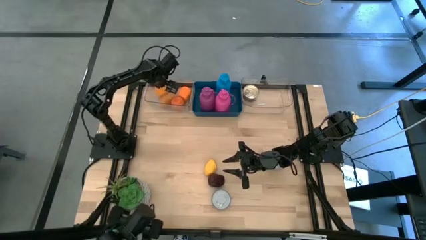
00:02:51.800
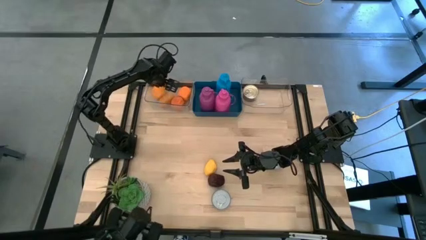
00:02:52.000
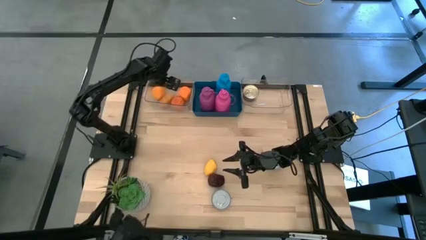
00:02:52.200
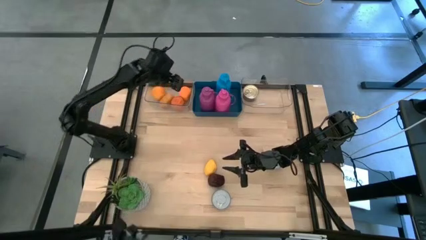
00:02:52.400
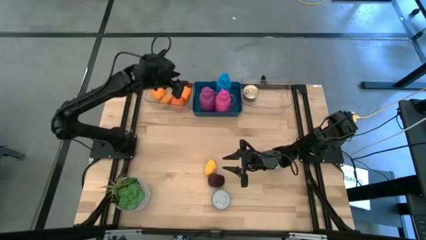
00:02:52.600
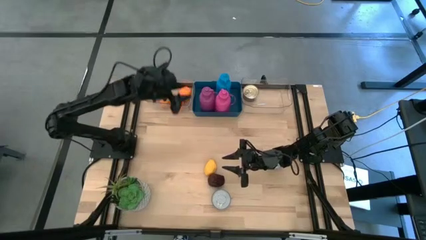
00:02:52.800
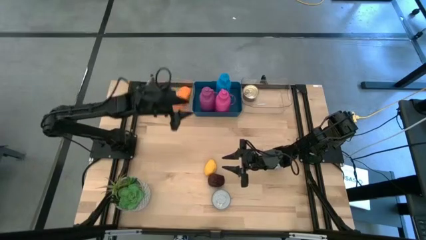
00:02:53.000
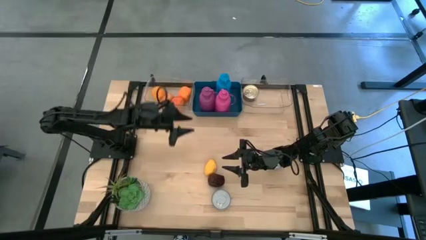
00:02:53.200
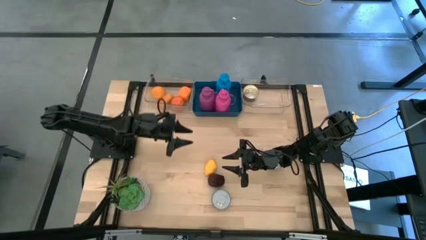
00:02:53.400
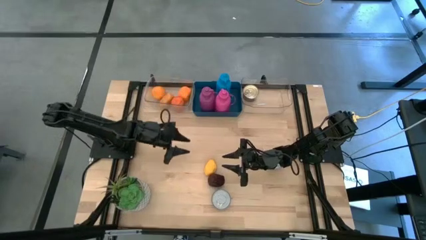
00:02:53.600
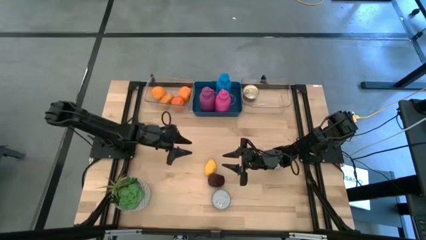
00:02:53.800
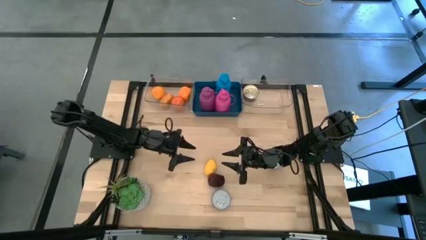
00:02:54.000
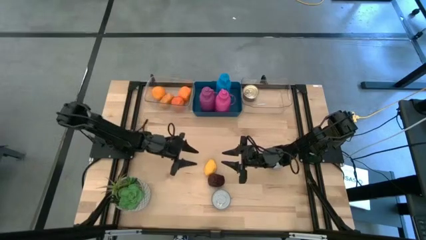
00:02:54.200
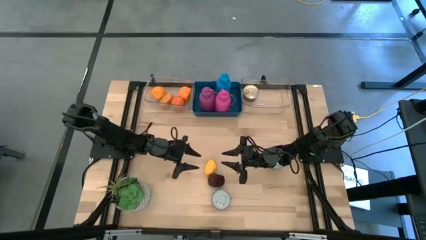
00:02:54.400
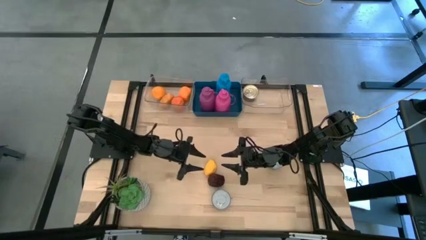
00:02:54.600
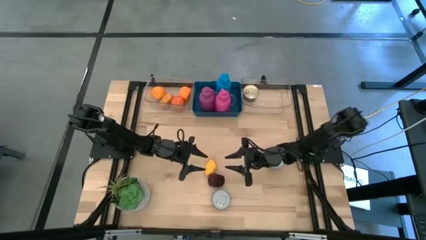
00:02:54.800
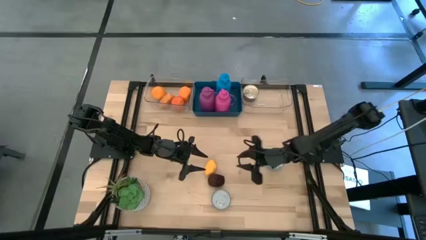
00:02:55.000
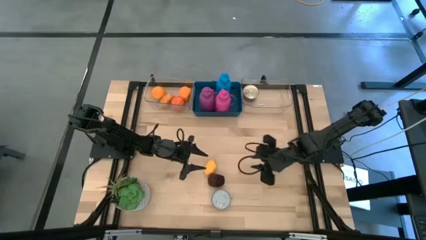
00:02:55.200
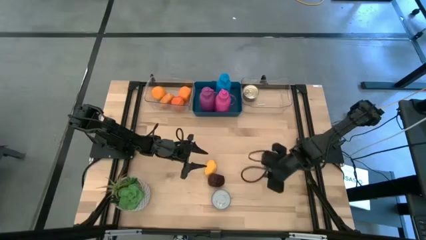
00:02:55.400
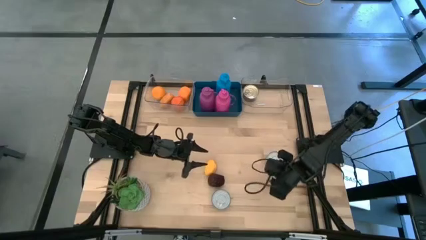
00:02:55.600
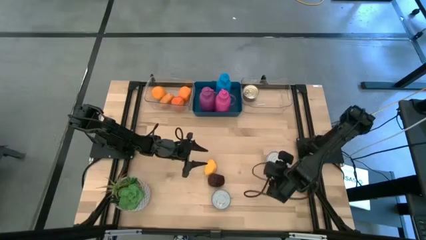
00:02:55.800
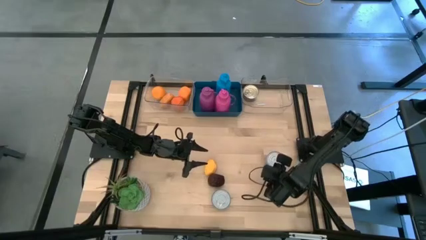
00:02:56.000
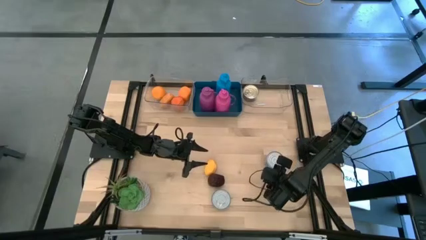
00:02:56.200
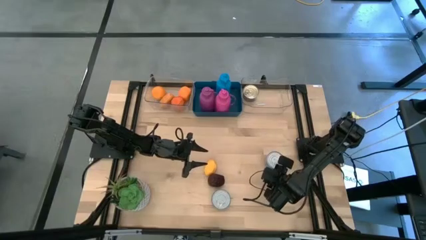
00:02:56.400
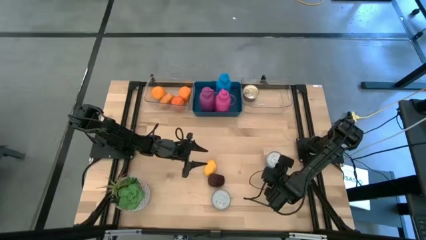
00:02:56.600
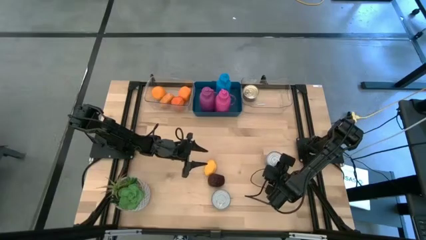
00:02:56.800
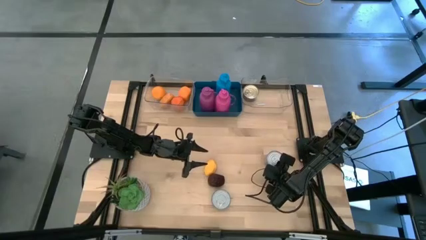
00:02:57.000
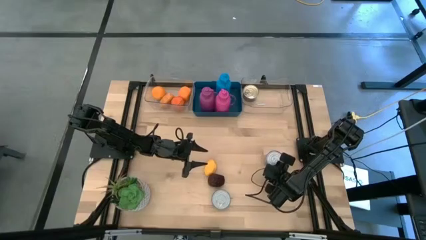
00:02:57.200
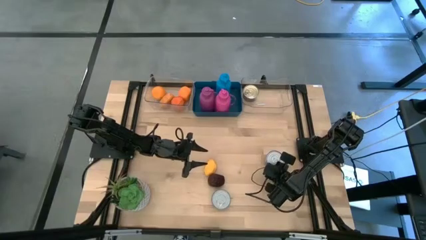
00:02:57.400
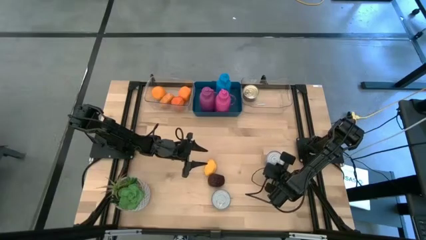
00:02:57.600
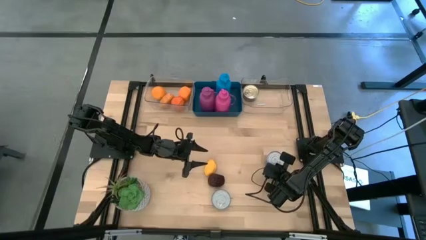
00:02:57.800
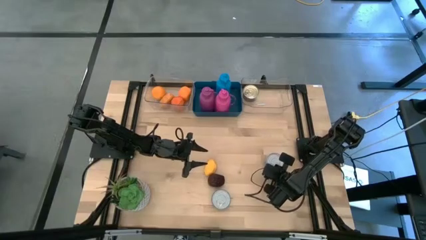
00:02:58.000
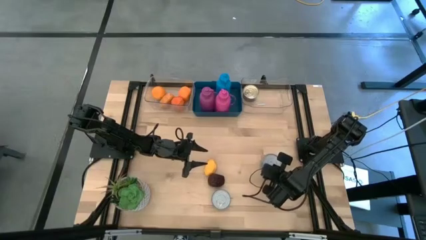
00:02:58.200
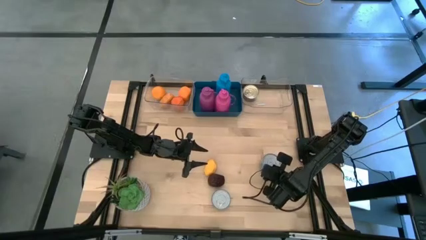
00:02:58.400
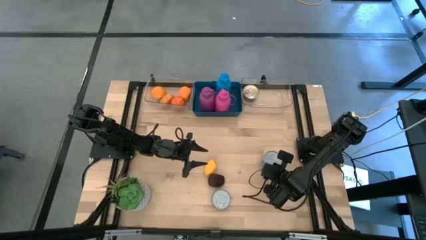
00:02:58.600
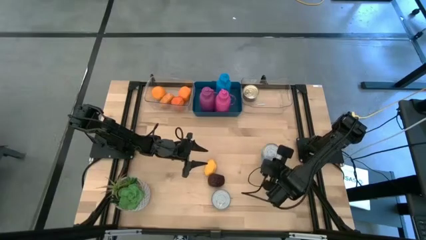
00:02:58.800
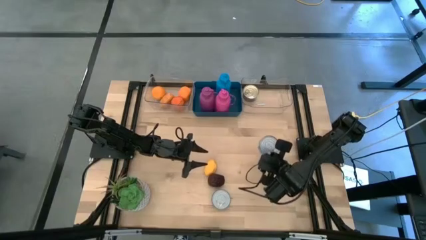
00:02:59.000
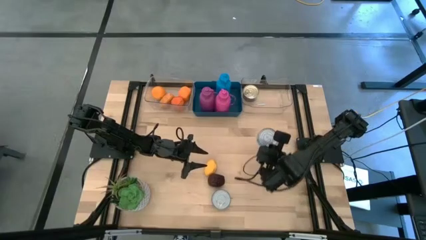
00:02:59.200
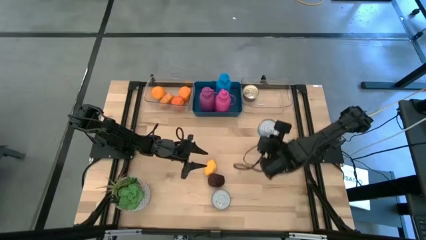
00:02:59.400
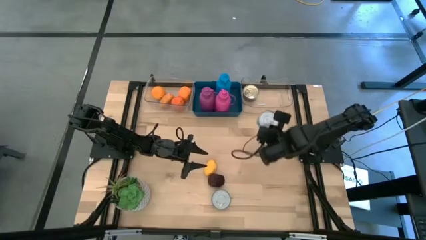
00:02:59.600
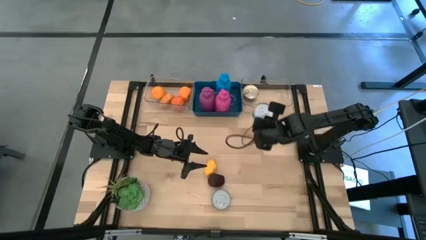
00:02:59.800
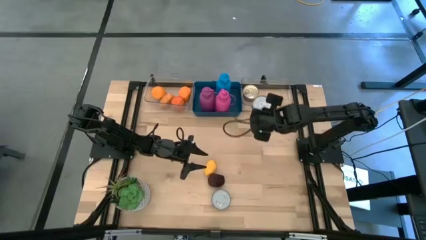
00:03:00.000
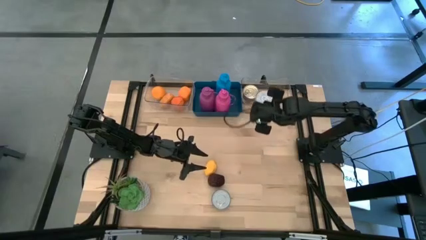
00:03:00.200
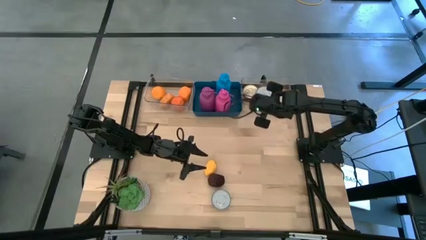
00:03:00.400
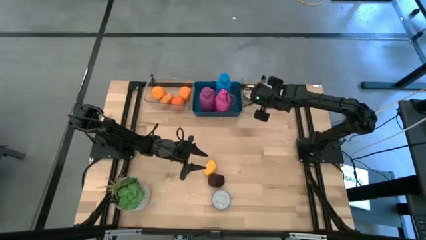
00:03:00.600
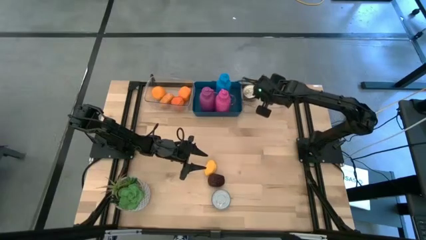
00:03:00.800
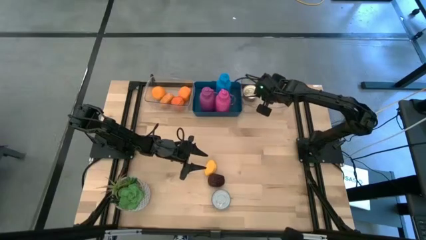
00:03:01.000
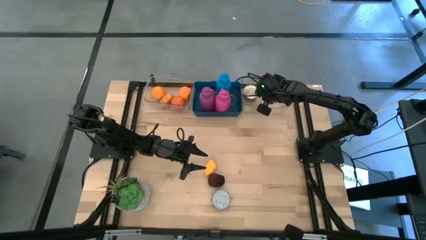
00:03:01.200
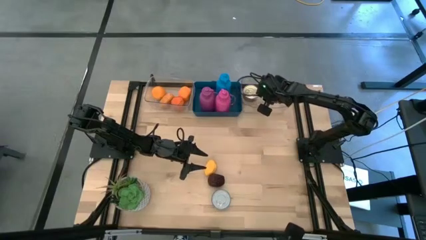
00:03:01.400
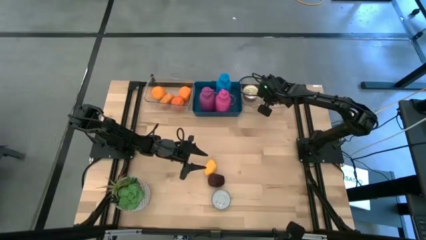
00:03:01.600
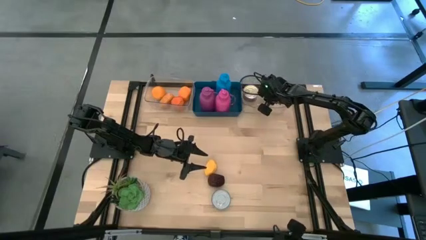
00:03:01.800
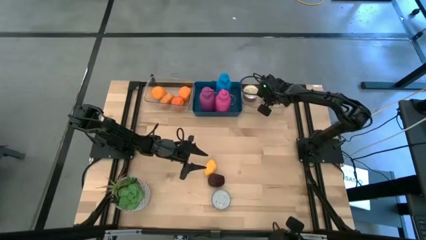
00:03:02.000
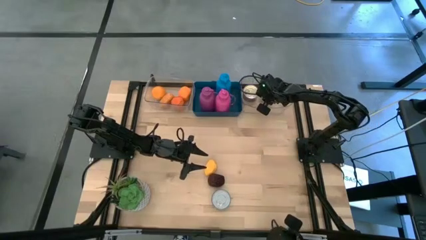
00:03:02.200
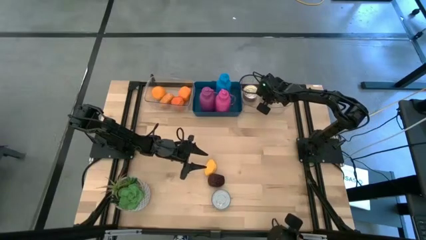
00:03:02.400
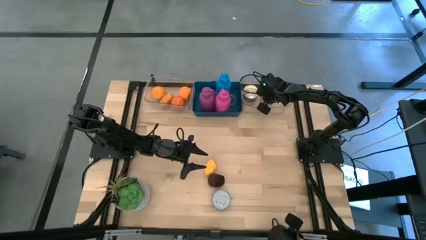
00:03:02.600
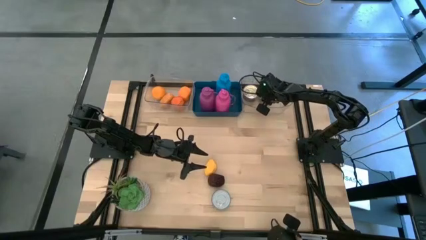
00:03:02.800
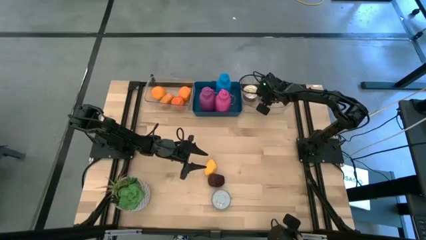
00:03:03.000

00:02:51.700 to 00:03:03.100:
Task: Pick & Place Food Item
Put the light blue tuna can into the right transparent bin

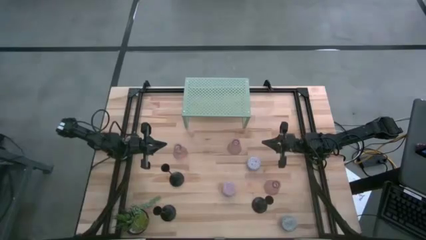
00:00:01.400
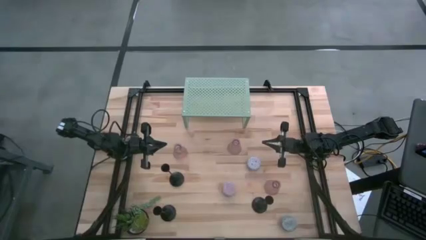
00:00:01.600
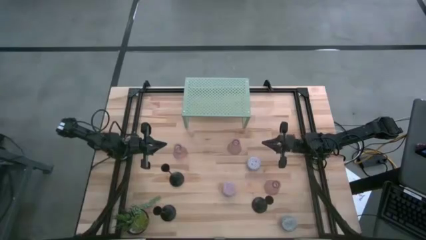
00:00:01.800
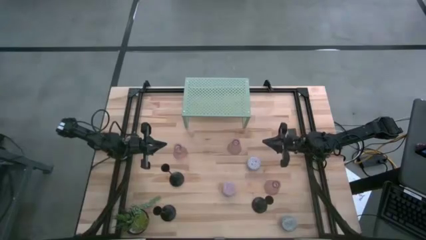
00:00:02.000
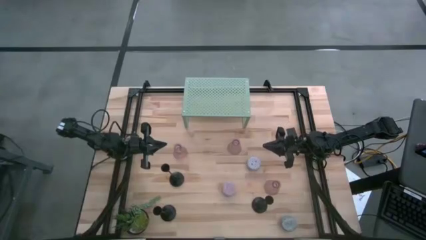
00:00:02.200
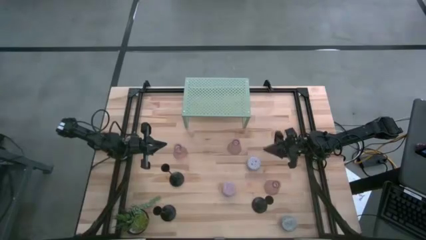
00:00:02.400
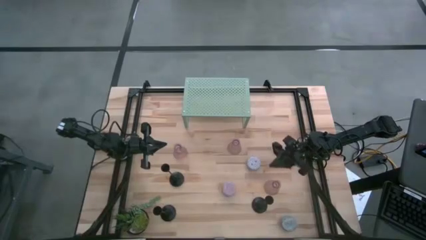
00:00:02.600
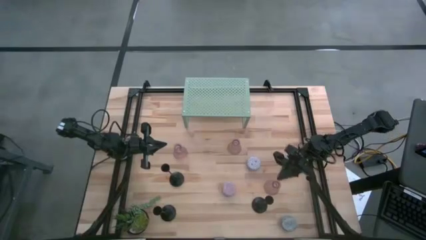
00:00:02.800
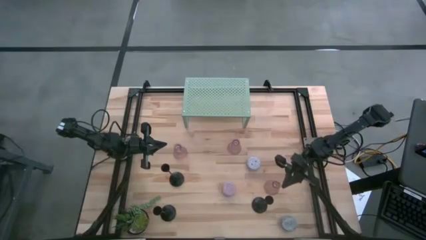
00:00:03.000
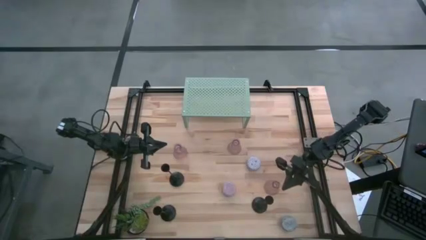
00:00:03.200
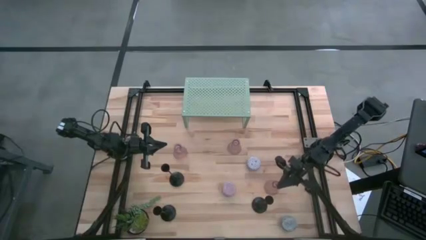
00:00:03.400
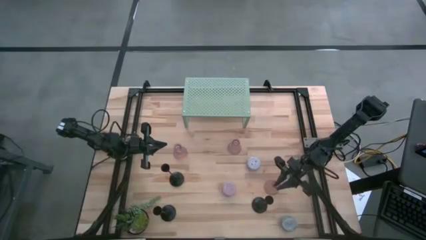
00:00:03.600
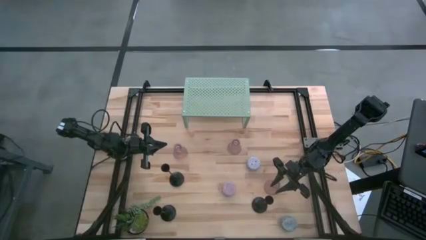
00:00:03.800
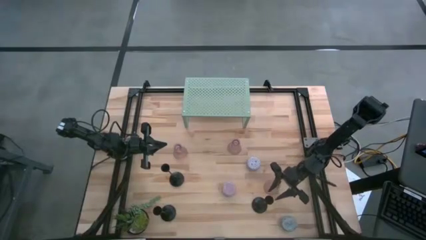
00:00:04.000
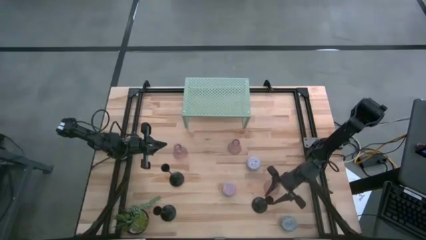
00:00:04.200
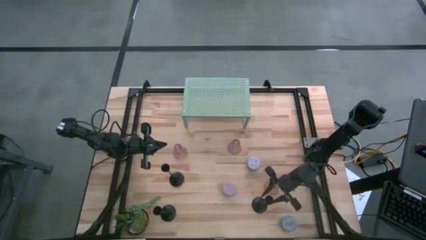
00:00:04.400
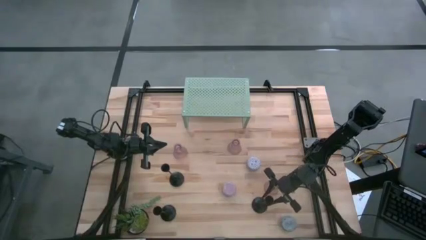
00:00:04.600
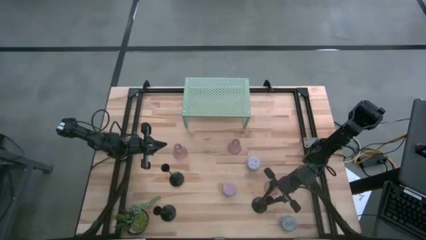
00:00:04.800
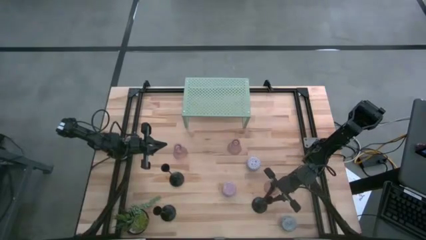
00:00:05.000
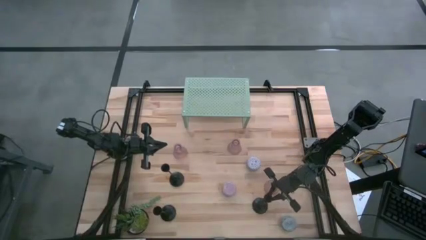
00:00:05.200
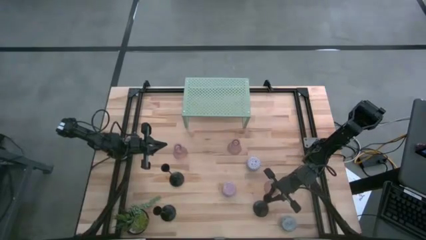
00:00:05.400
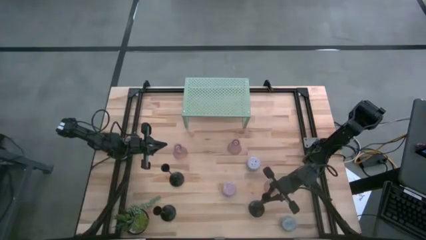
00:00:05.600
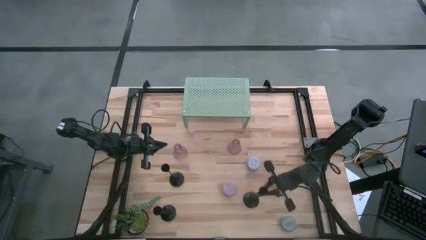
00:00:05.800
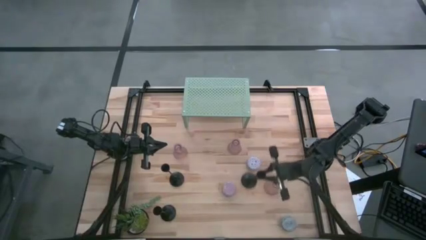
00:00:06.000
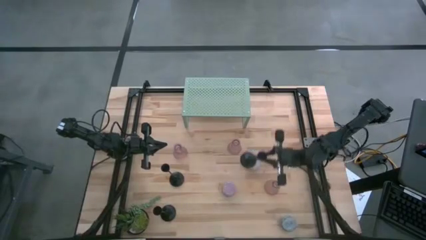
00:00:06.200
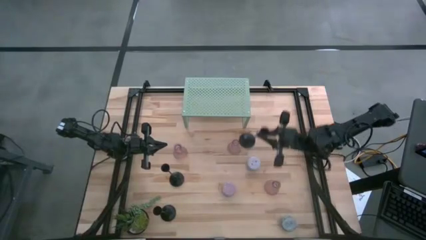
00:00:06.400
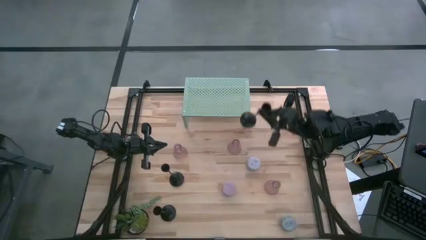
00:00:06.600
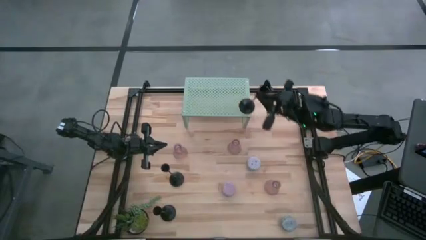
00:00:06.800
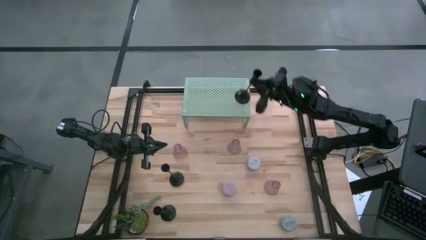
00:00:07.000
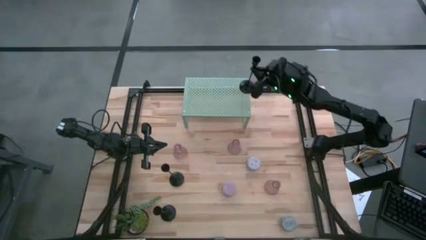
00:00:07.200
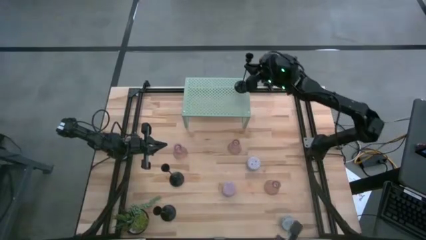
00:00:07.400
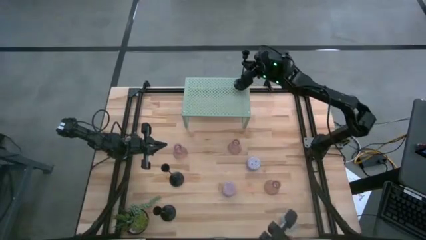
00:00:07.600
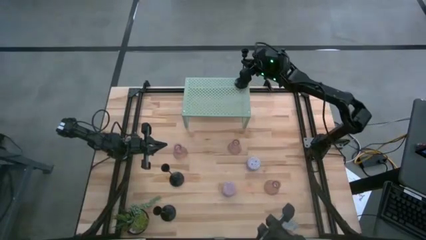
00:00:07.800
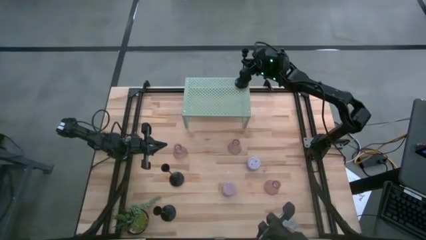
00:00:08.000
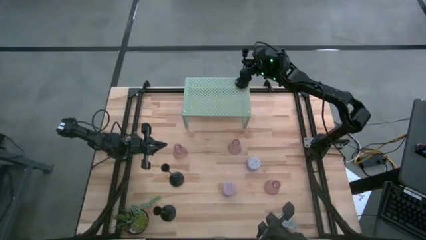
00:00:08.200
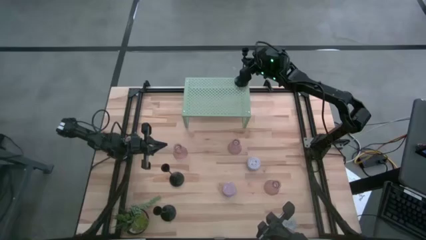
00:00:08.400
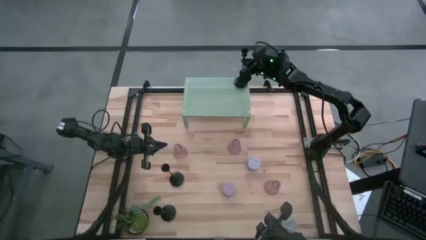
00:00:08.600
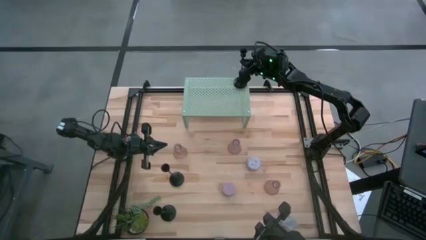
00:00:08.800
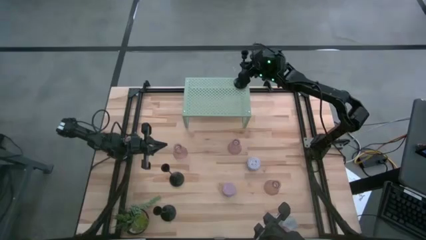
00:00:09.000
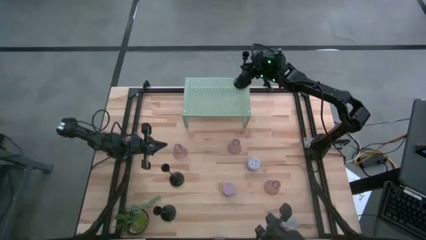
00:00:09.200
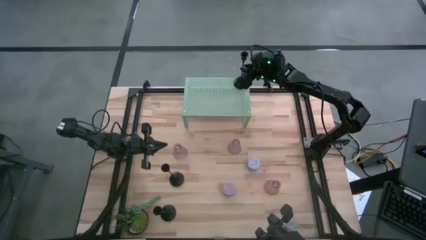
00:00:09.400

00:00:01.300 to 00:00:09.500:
Task: Pick & Place candle stick holders
Put the bottom right black candle holder on the shelf
